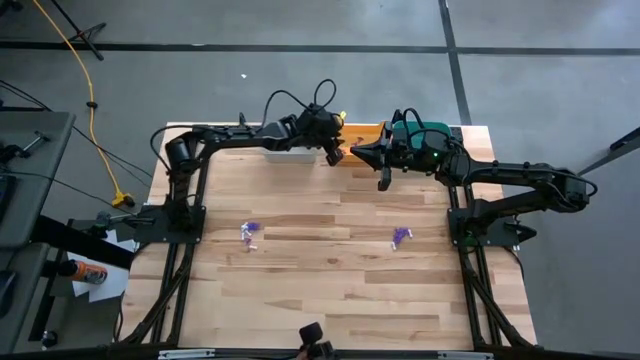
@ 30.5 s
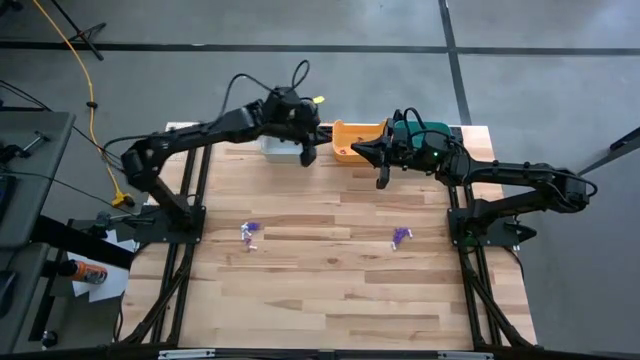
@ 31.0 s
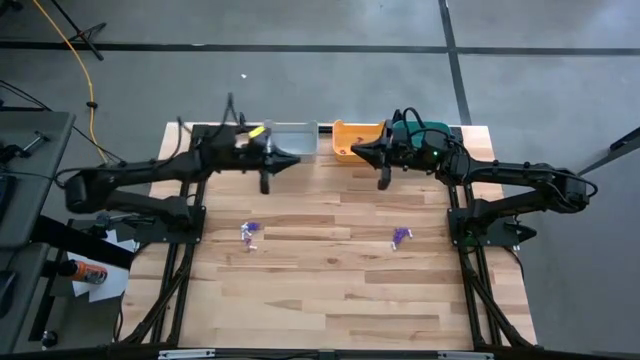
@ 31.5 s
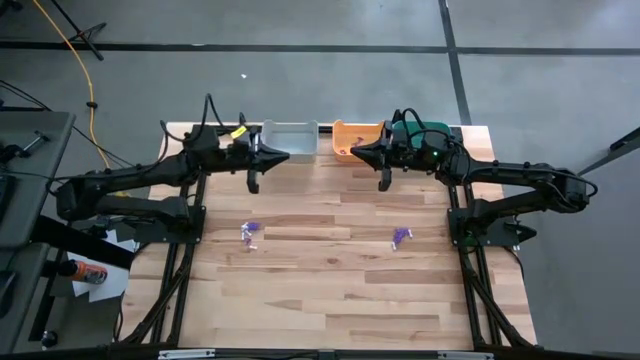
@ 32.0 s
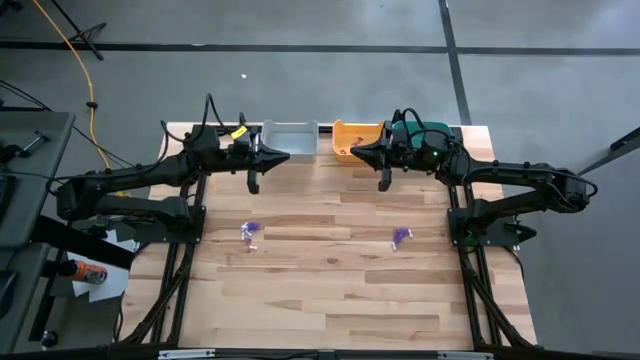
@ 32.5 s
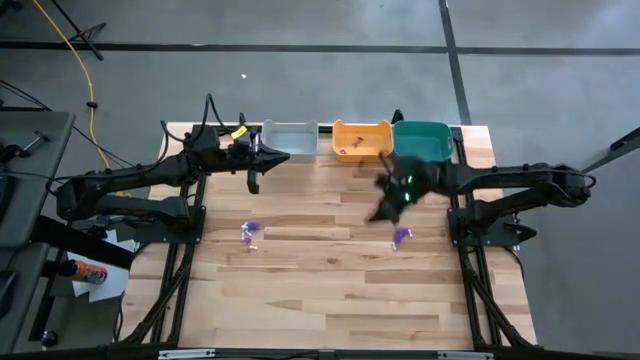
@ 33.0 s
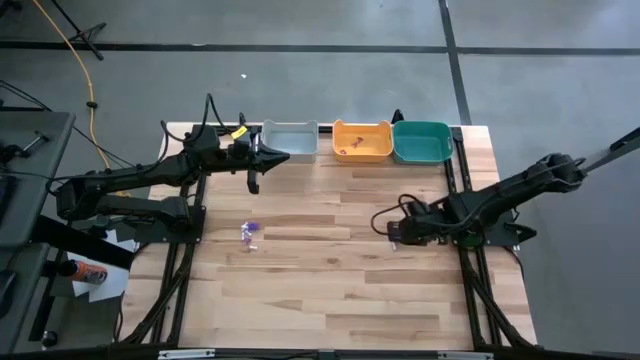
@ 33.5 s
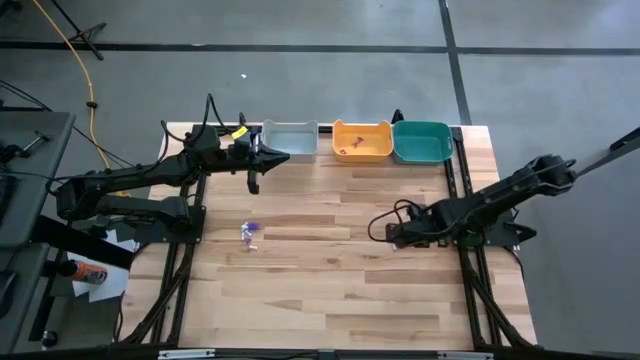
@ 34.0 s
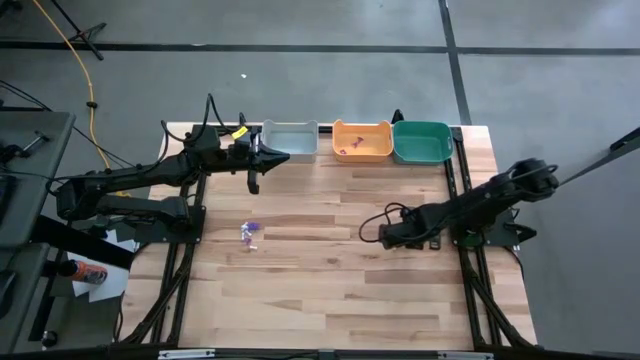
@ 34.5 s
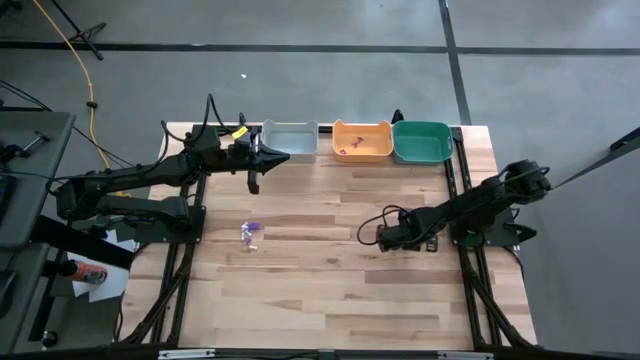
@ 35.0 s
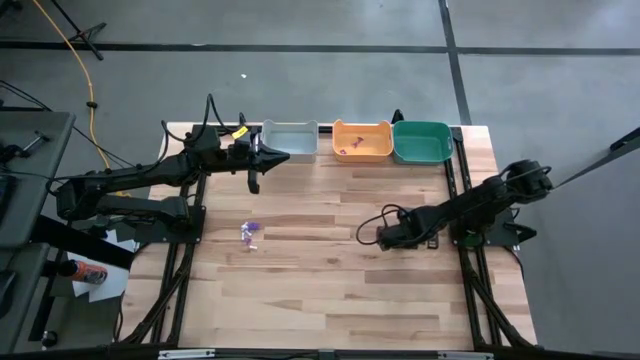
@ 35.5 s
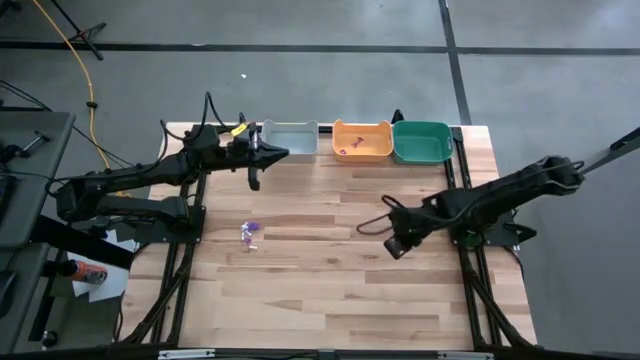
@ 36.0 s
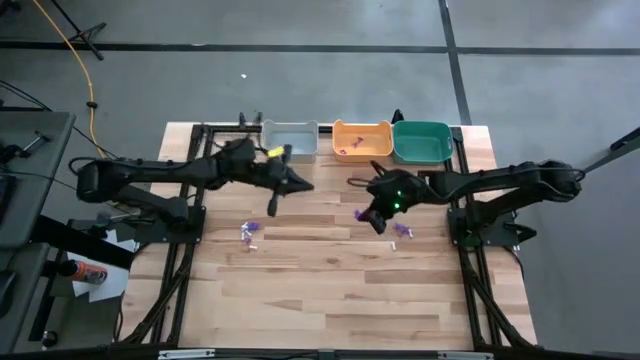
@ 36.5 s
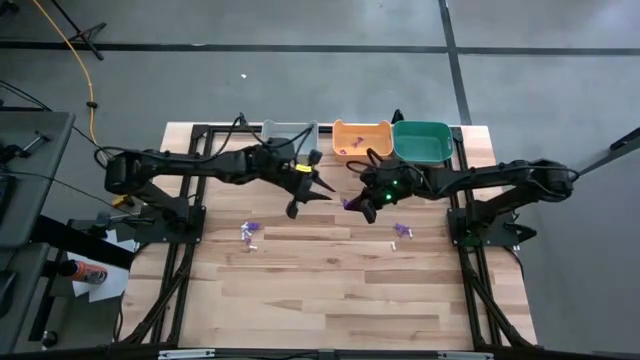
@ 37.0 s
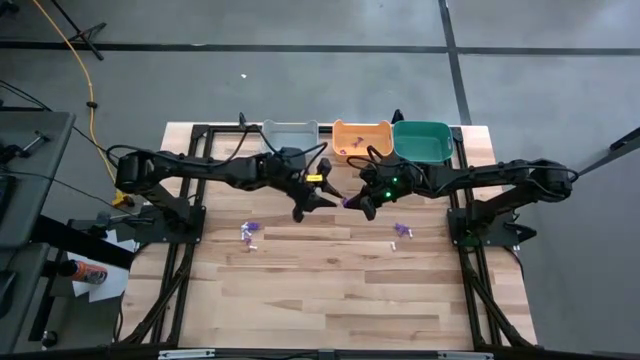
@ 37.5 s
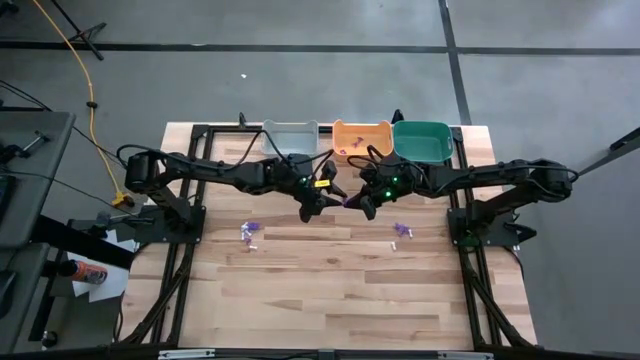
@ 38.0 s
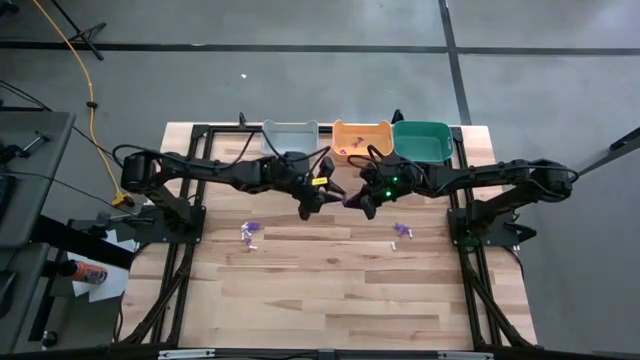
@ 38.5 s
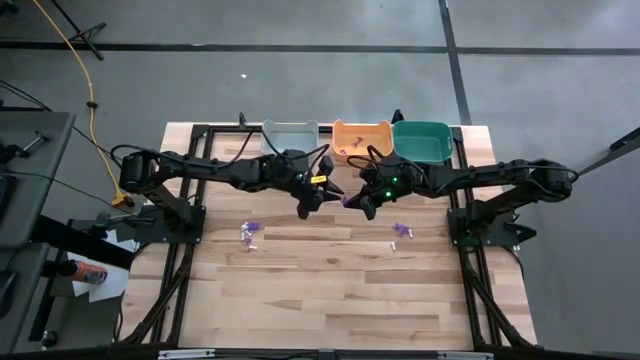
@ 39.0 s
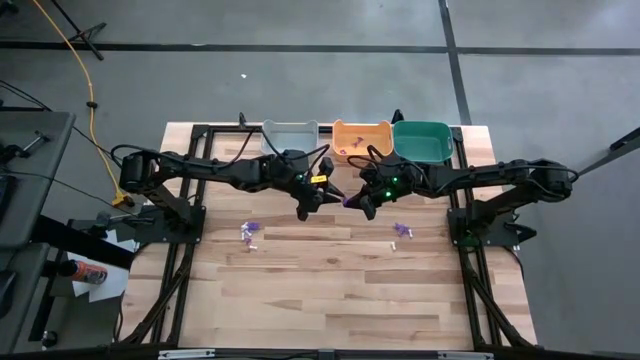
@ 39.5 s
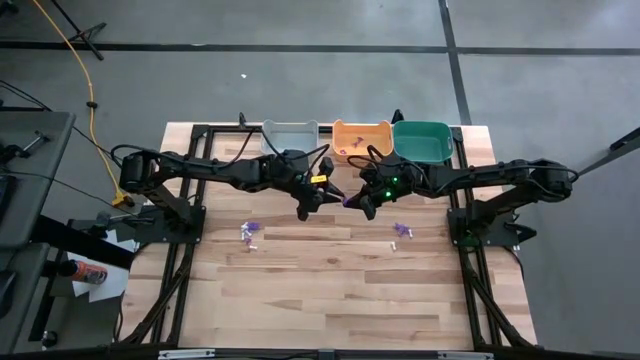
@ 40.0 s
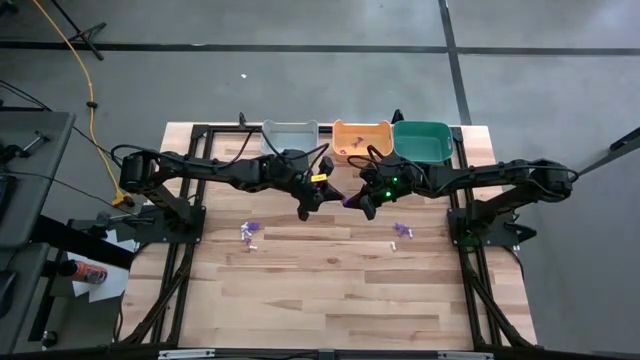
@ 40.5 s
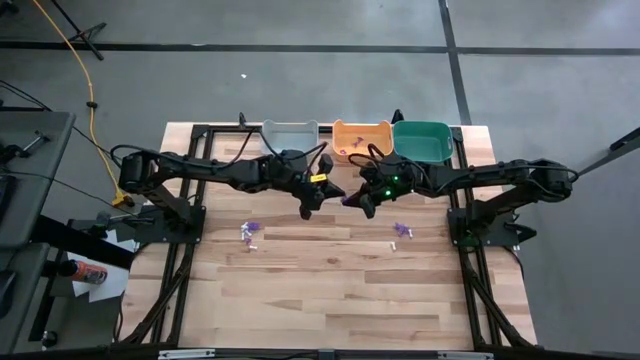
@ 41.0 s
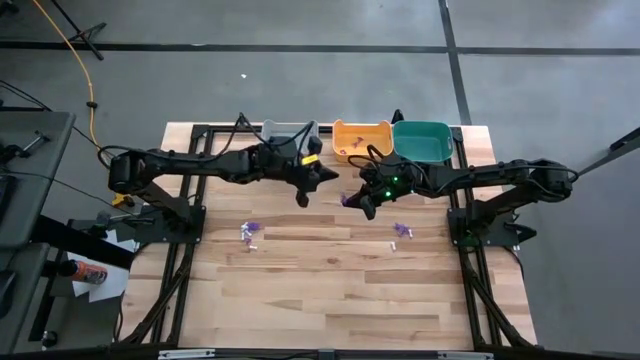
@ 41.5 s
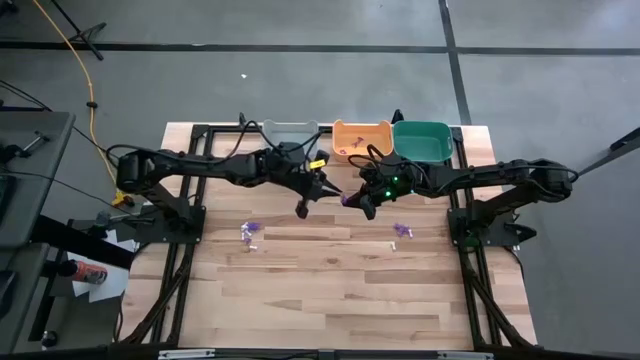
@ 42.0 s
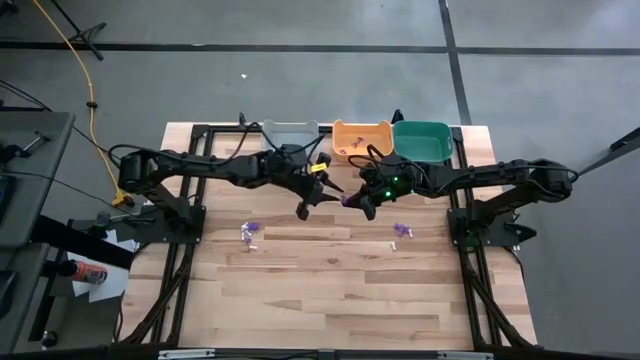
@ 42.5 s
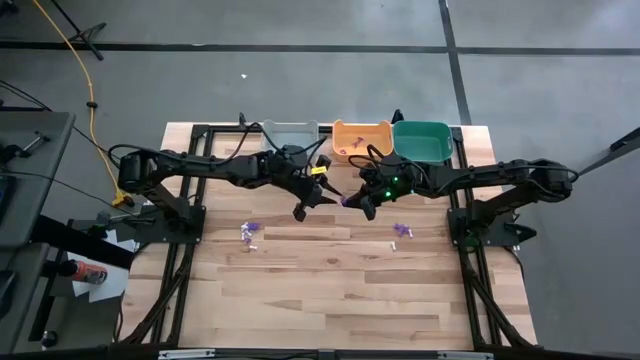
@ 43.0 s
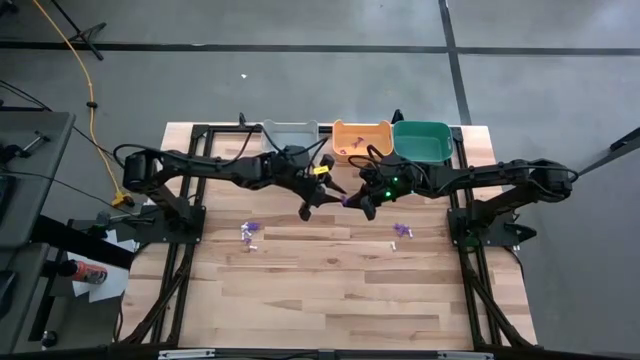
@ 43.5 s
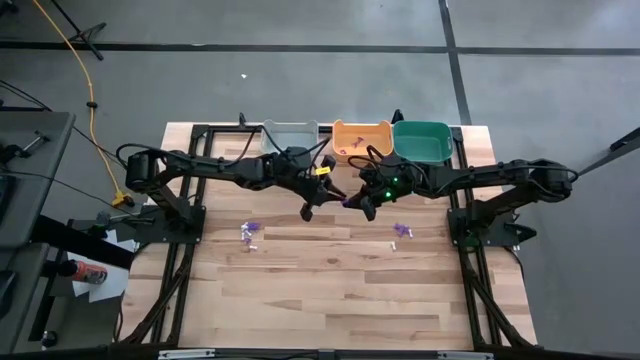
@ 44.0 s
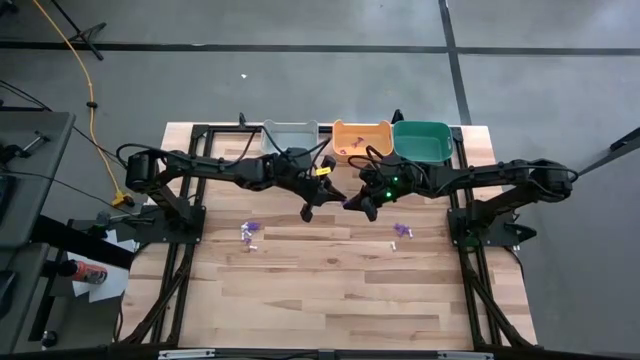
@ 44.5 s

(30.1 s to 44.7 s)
Task: Sort Halloween decoration
Put the purple spider toy into the gray bin

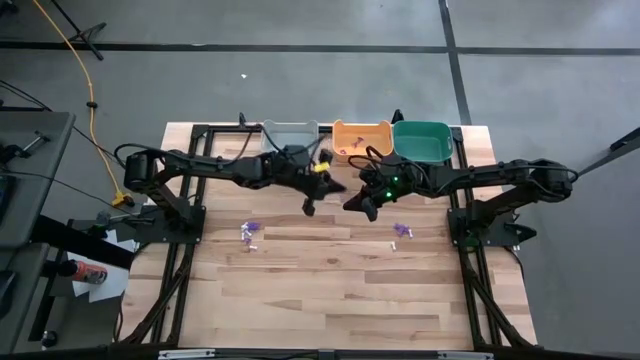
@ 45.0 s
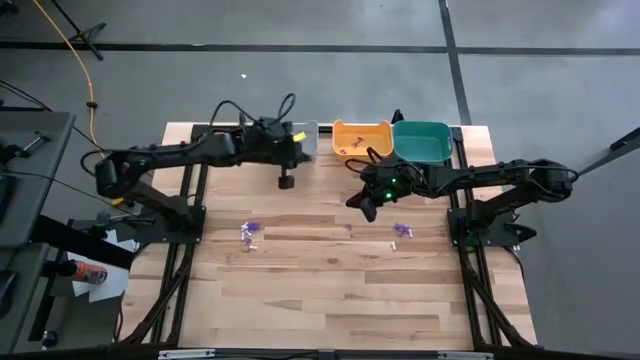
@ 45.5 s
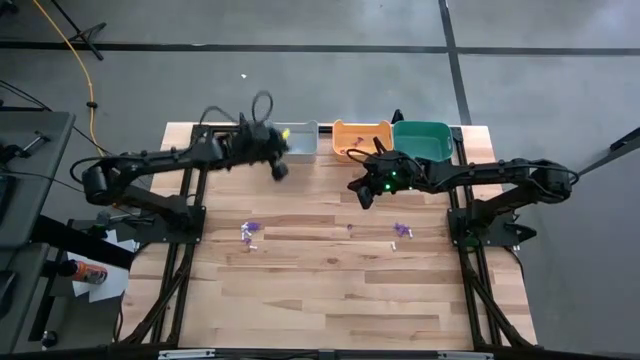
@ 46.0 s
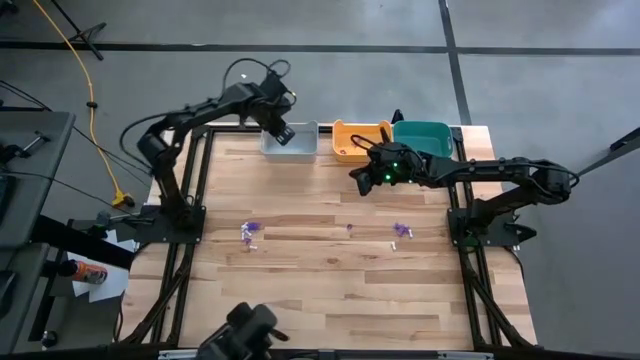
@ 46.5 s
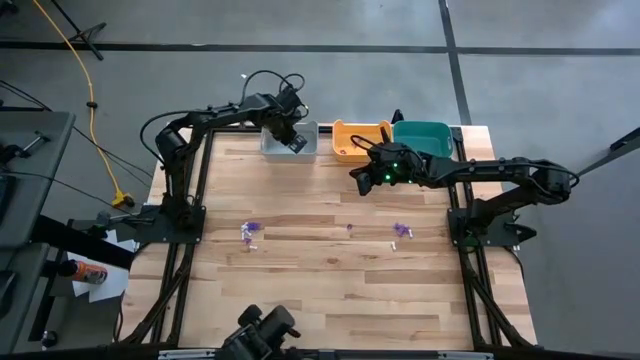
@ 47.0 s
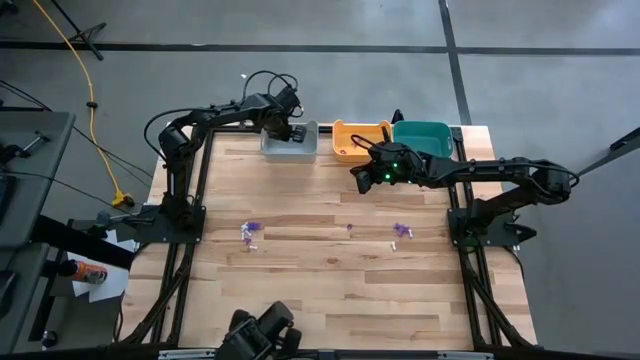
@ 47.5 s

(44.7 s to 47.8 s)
Put the purple spider toy into the gray bin

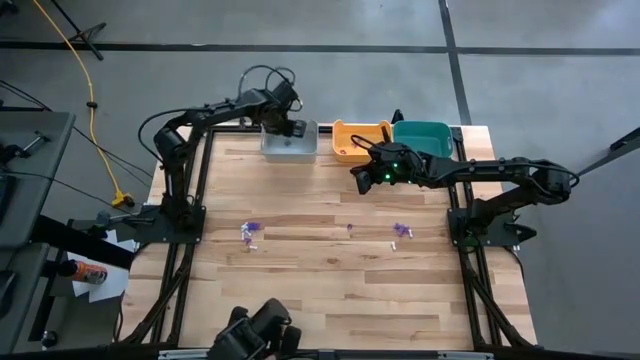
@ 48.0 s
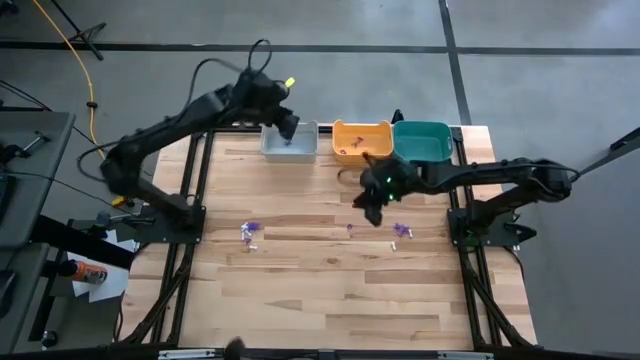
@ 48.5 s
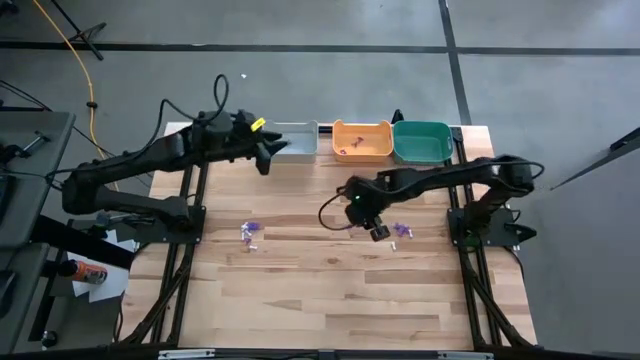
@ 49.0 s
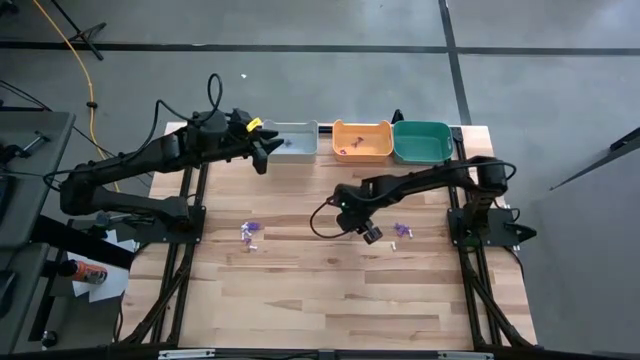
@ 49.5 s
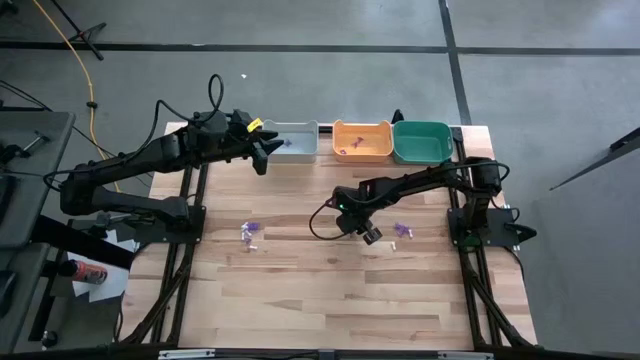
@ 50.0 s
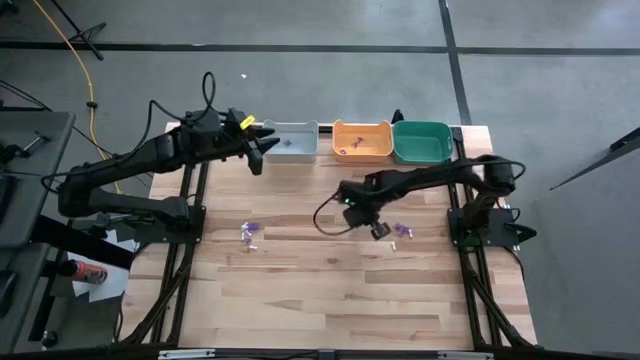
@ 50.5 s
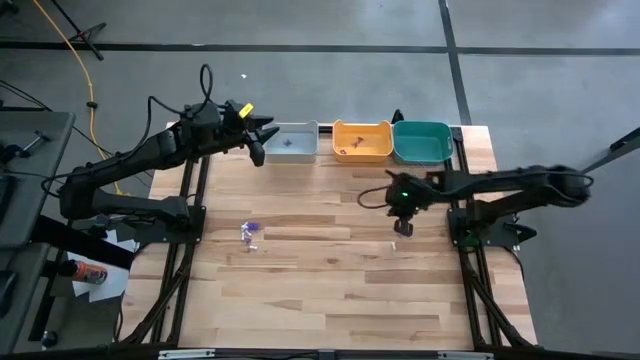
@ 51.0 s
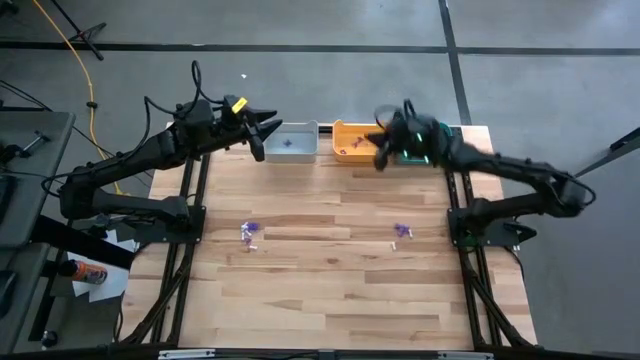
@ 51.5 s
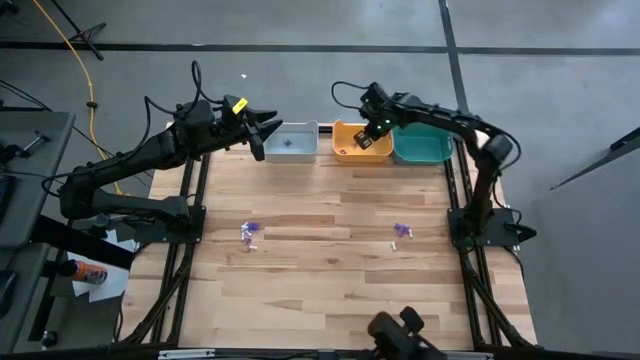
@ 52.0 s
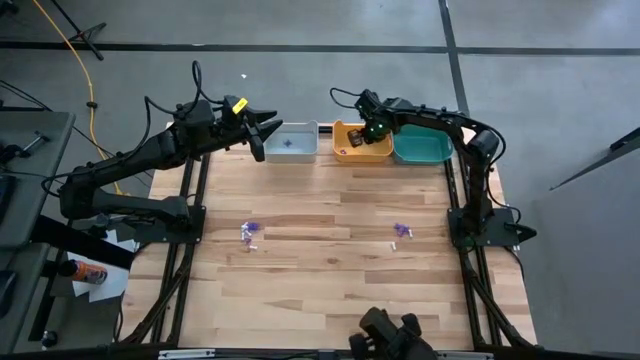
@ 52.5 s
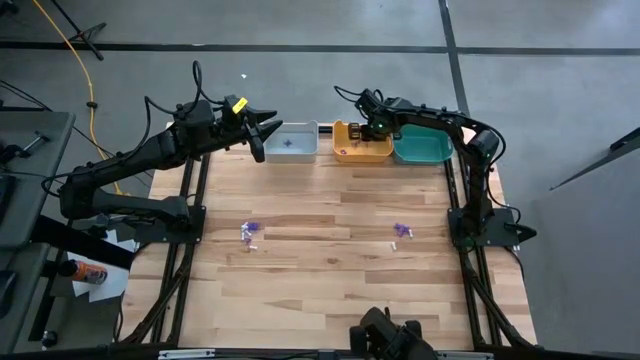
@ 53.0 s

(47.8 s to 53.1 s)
Put the purple witch hat toy into the orange bin
